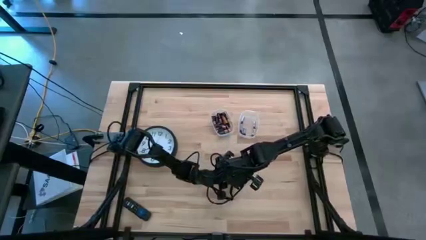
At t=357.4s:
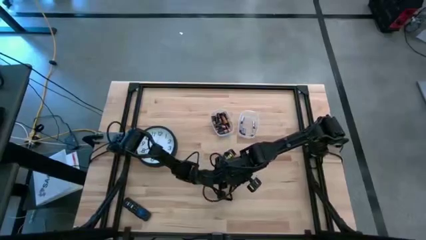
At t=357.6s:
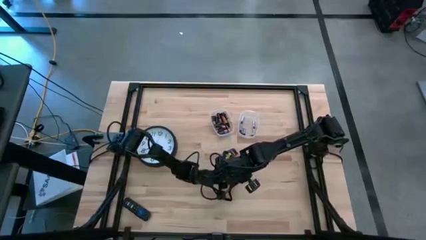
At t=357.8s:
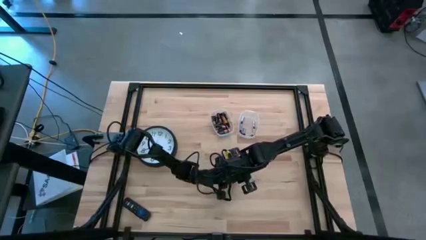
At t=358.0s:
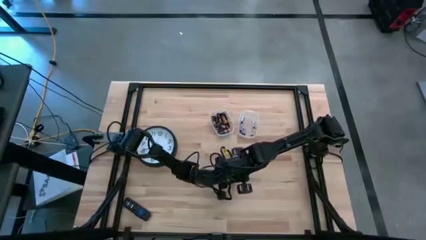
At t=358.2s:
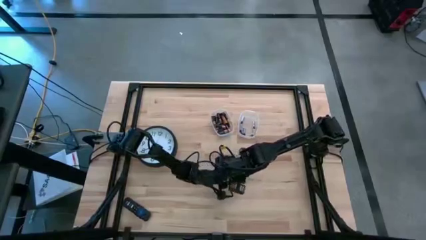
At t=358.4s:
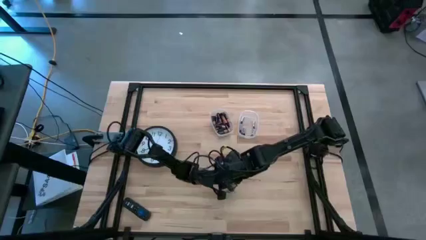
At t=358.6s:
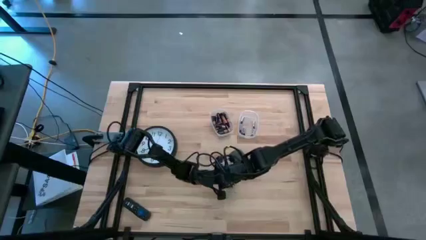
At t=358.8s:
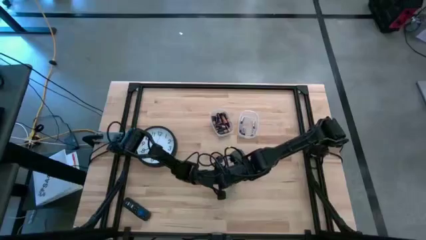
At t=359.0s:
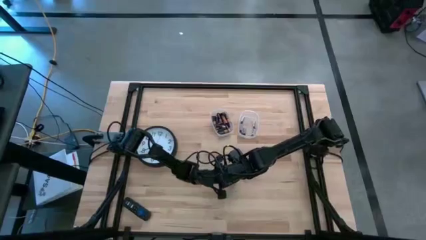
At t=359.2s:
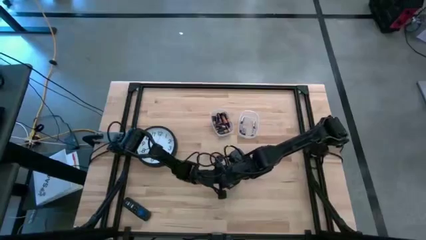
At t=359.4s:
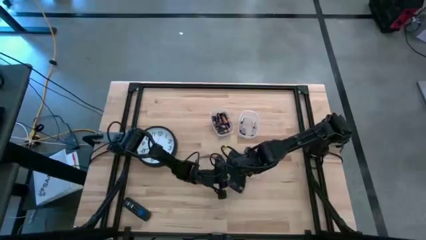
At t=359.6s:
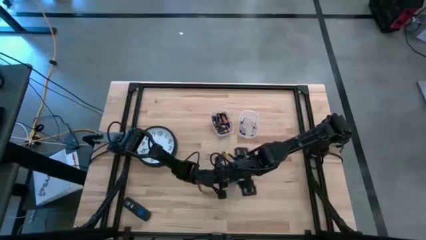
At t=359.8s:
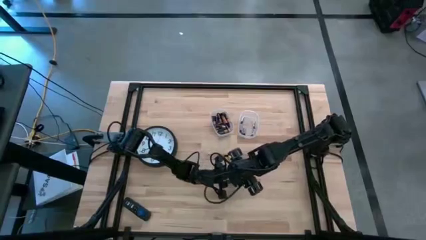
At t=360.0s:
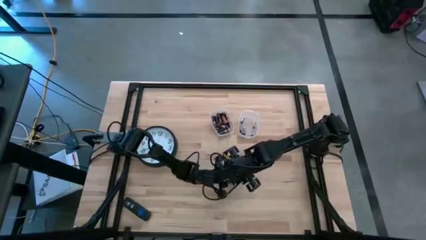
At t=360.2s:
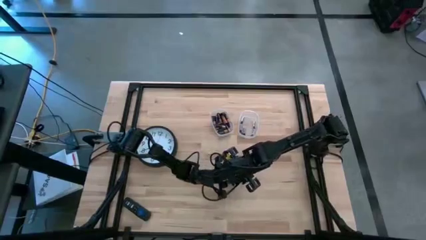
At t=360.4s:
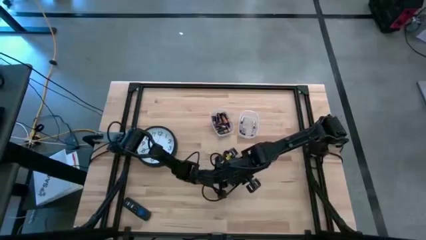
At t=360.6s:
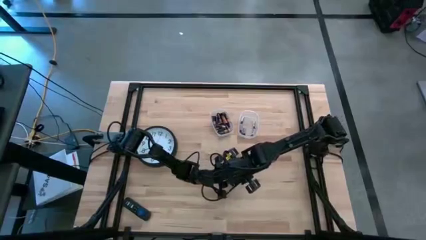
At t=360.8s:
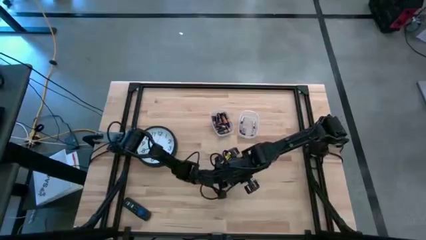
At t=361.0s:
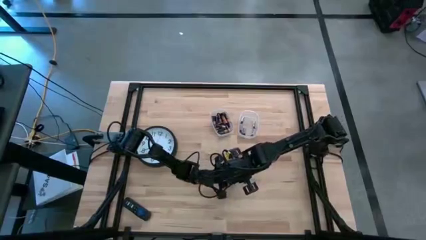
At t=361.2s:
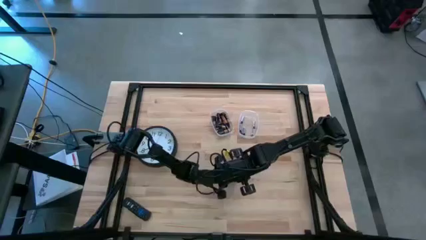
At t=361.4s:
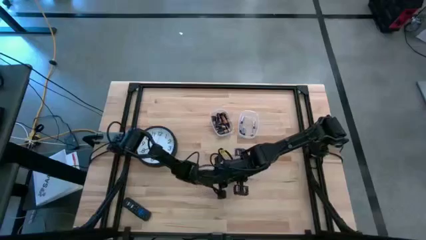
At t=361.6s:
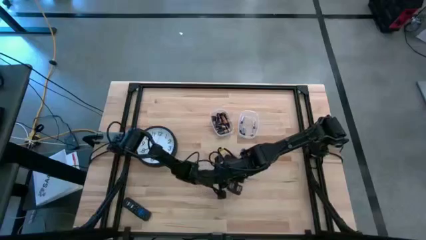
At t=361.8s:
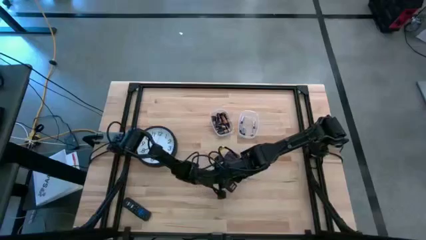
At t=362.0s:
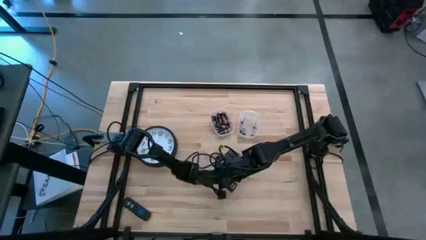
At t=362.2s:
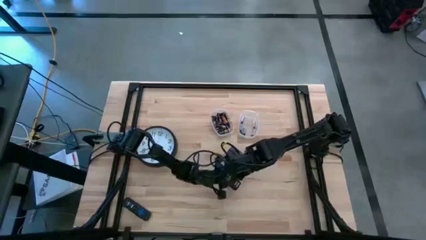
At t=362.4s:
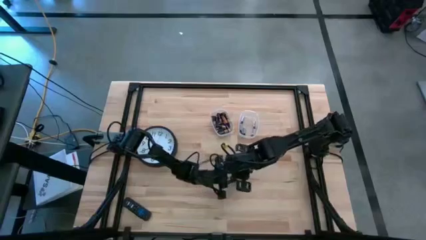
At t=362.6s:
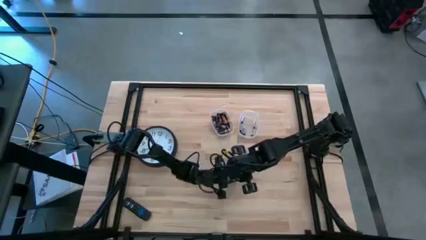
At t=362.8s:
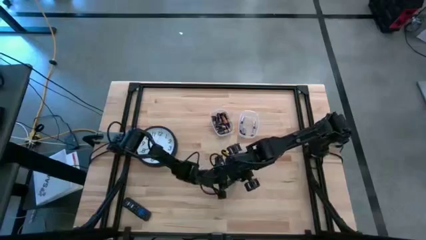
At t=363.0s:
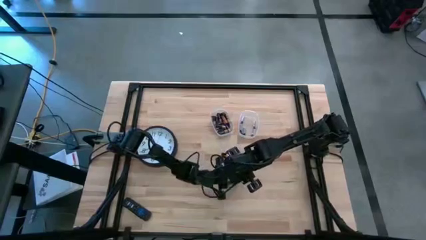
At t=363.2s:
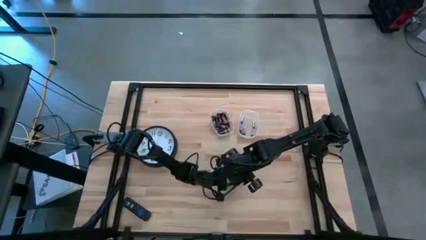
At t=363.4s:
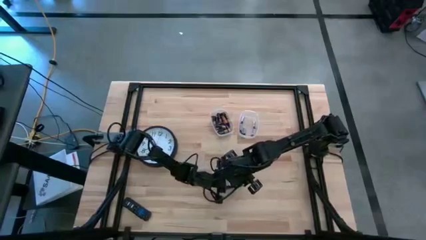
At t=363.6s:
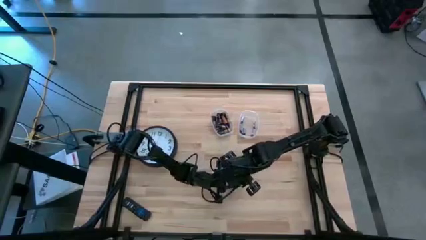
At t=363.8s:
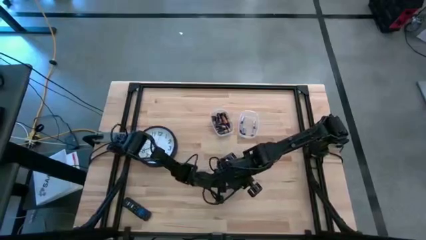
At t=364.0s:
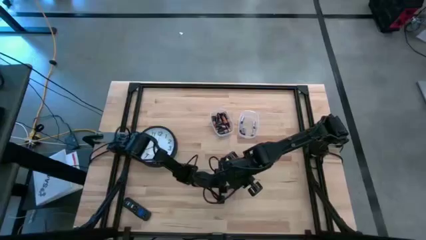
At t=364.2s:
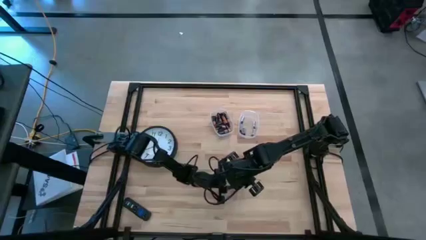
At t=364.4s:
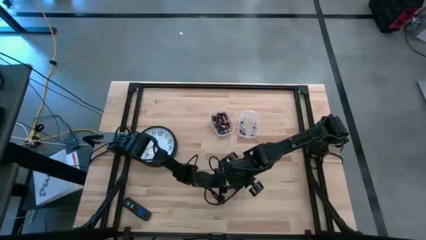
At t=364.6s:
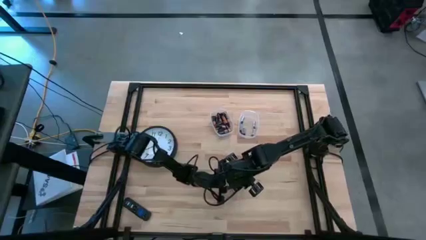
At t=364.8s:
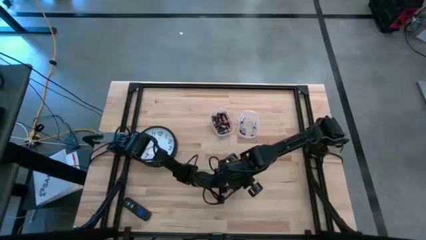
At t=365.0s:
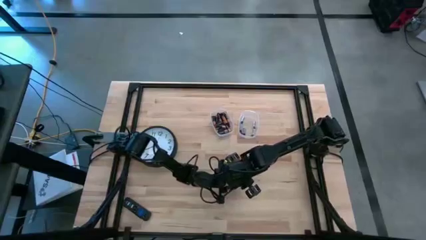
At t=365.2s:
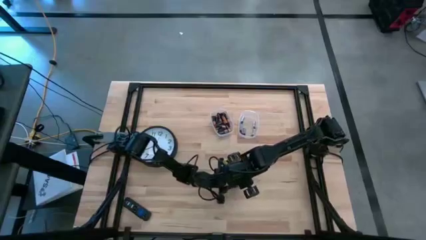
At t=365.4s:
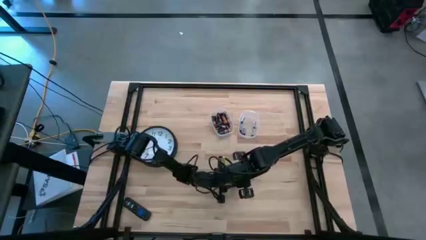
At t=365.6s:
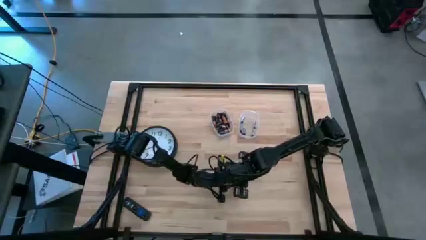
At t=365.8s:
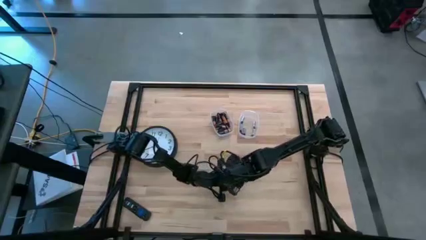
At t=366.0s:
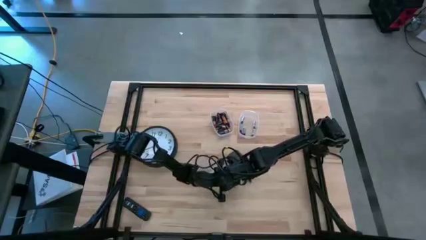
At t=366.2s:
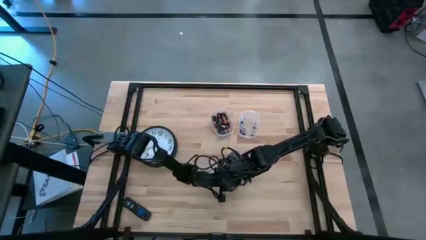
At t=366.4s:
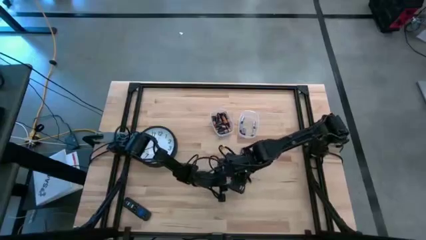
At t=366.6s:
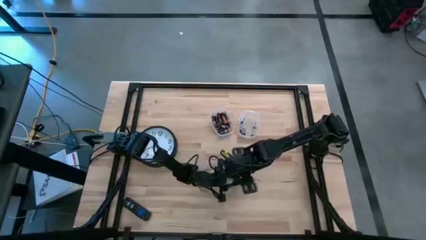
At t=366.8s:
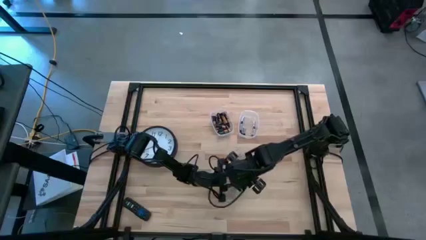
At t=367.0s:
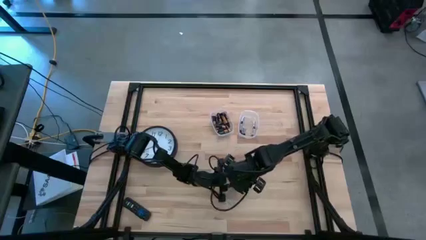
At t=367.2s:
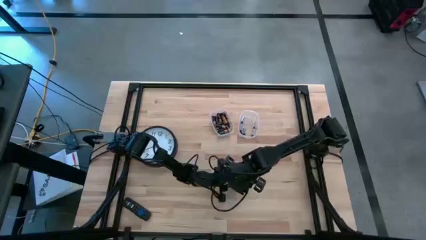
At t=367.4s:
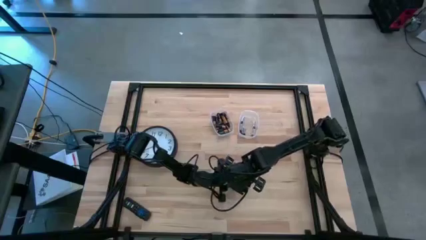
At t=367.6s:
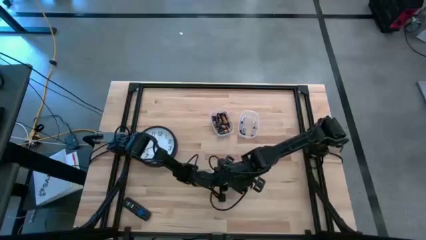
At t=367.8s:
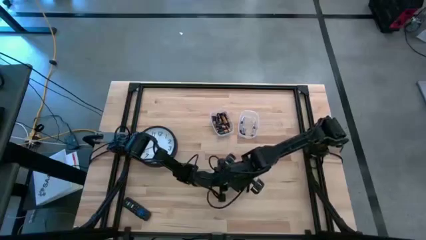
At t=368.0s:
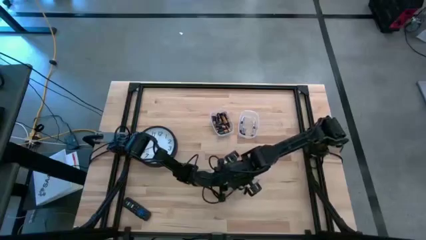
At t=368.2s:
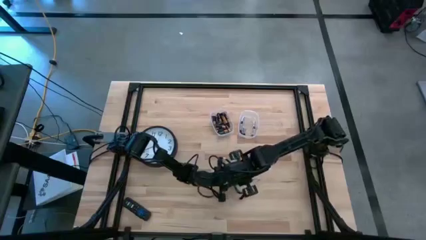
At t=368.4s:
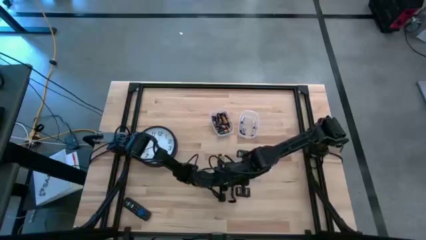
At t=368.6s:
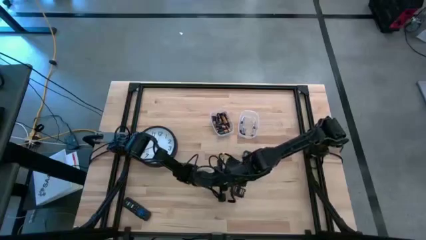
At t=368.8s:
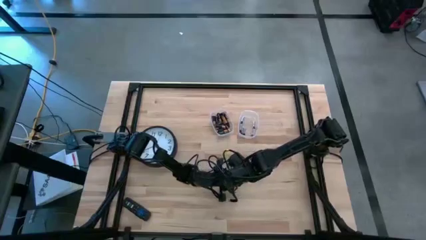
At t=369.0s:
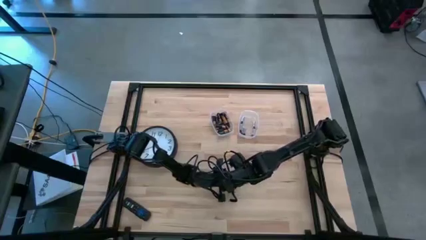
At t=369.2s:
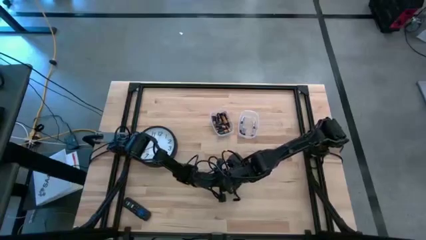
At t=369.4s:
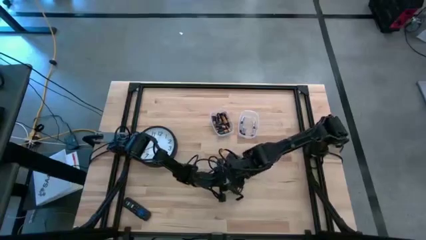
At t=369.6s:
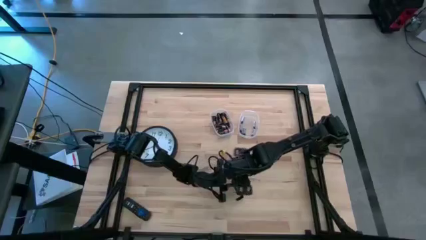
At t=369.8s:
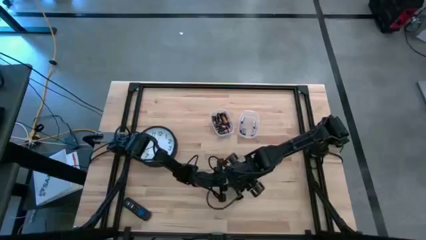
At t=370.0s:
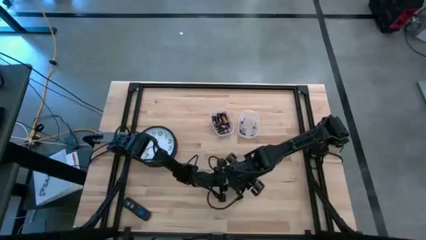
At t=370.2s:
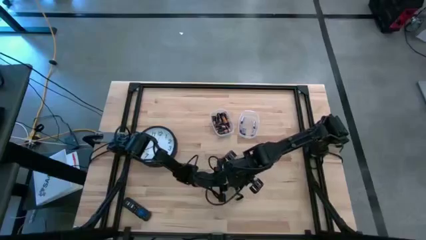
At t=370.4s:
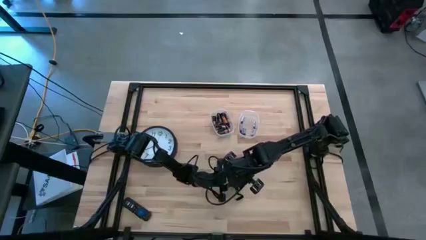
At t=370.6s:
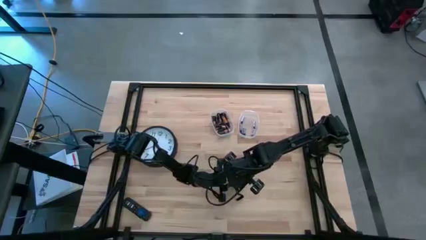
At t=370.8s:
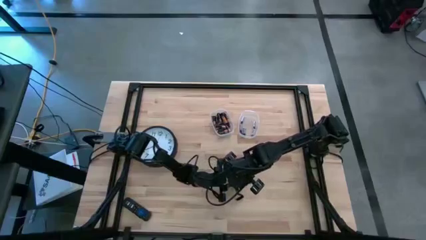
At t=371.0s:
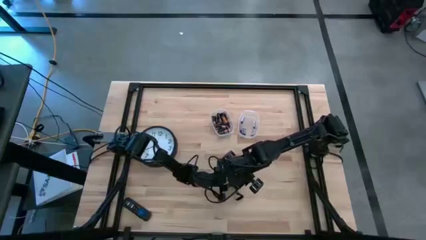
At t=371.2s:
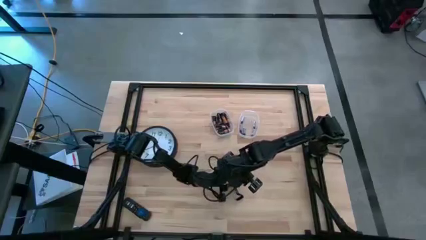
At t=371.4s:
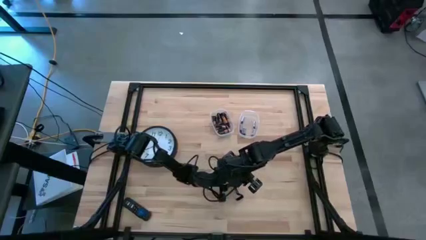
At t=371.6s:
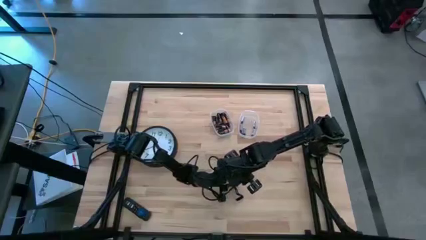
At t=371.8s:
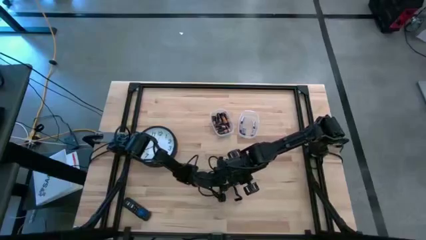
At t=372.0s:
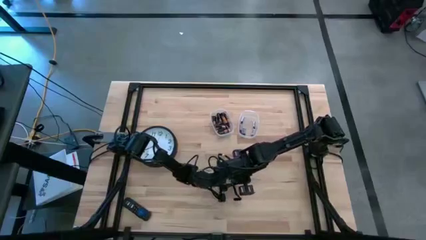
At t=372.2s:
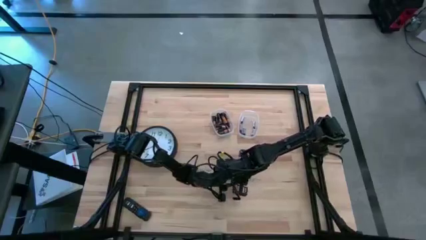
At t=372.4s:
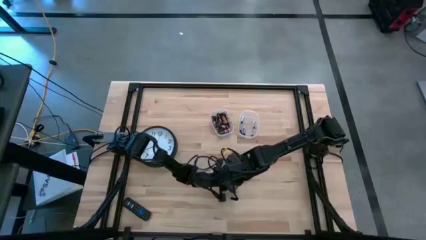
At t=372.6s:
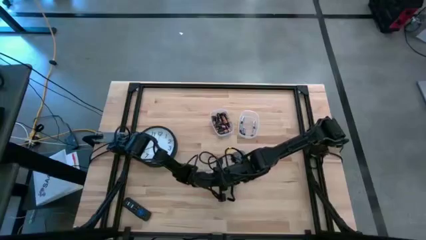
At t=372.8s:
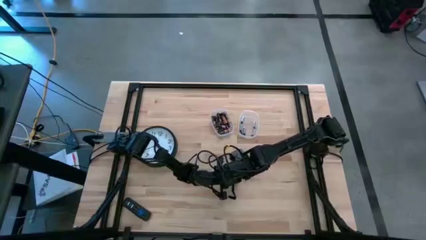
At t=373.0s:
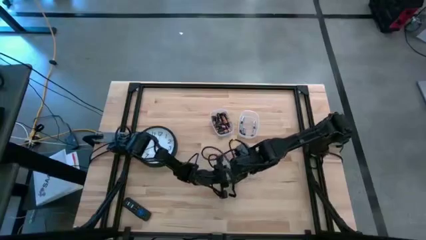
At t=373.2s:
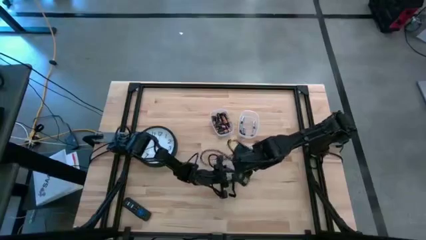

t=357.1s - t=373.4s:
Task: Insert battery
Close the lid of the black flashlight
